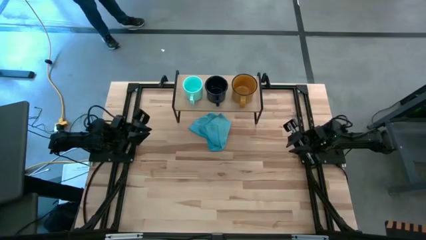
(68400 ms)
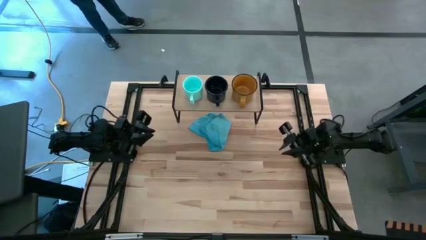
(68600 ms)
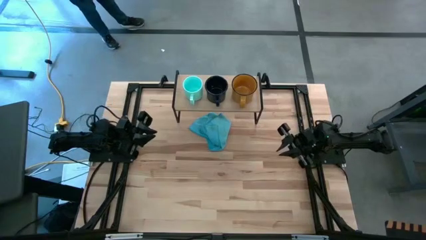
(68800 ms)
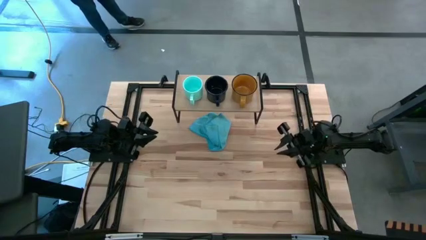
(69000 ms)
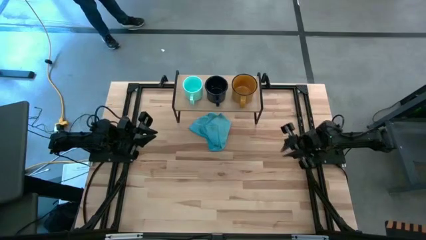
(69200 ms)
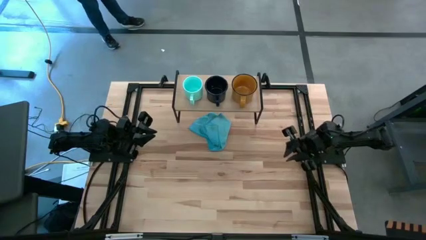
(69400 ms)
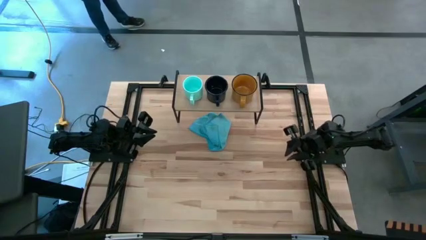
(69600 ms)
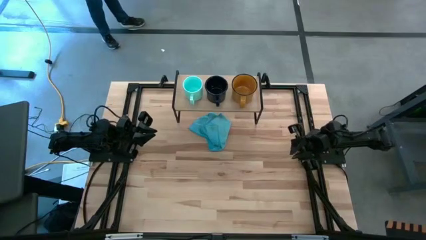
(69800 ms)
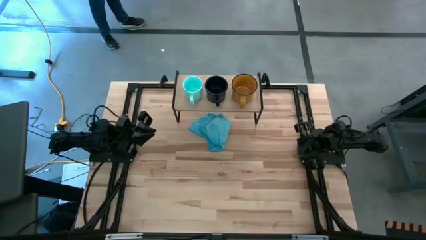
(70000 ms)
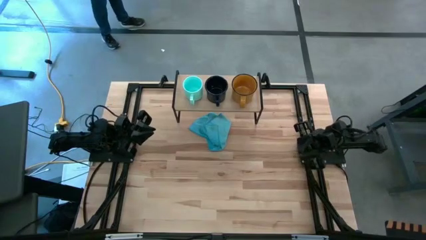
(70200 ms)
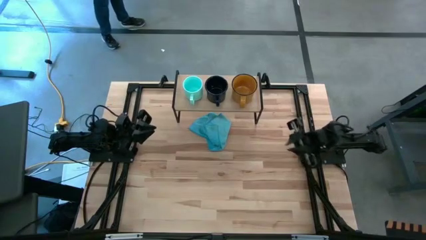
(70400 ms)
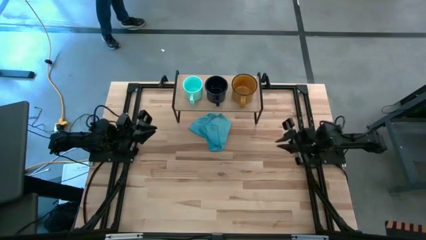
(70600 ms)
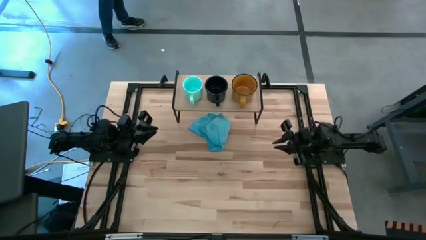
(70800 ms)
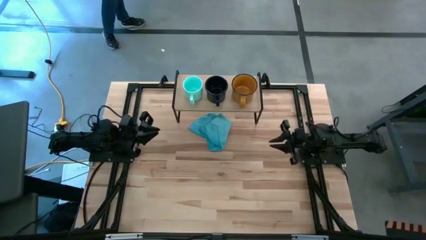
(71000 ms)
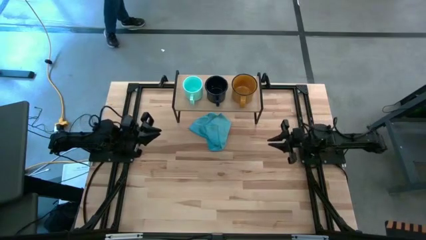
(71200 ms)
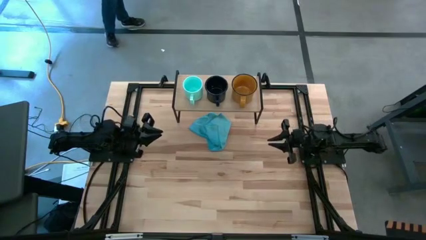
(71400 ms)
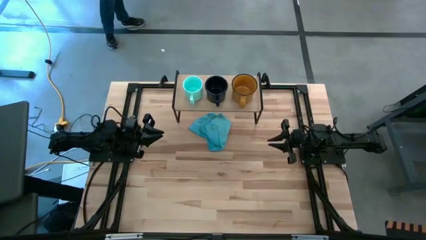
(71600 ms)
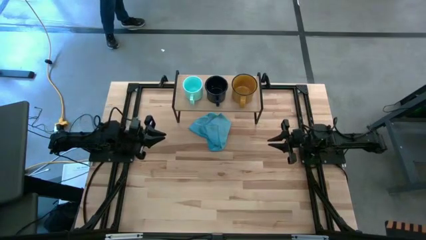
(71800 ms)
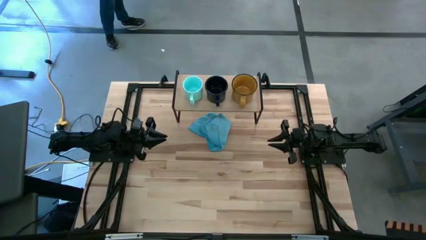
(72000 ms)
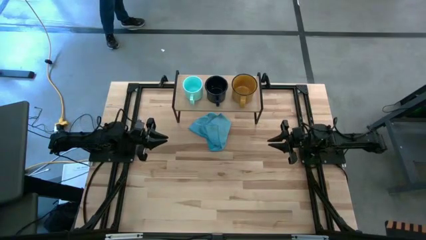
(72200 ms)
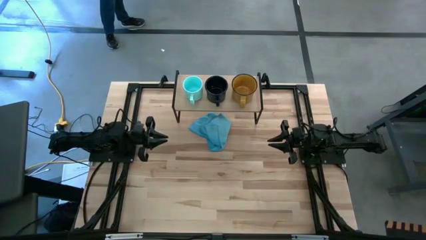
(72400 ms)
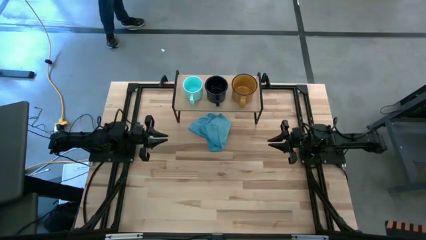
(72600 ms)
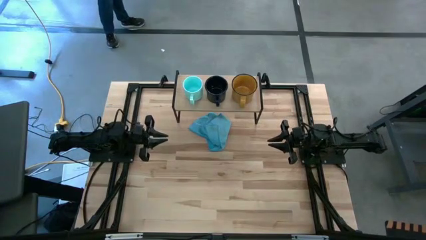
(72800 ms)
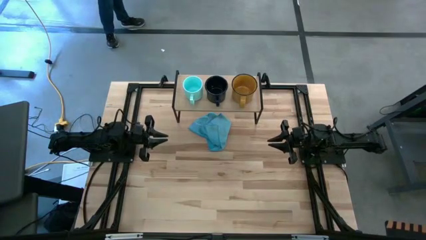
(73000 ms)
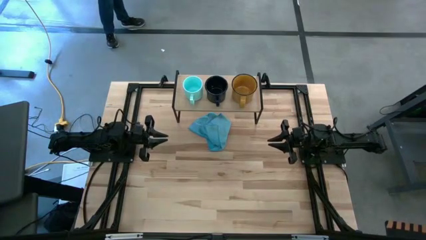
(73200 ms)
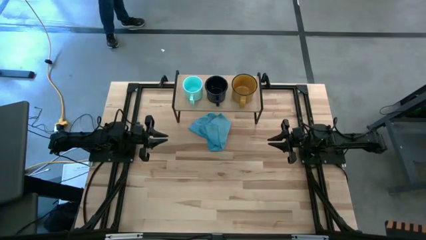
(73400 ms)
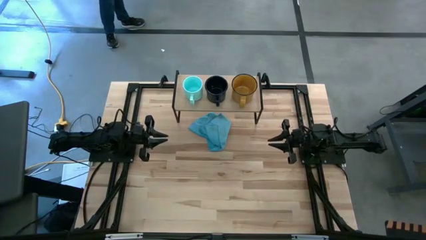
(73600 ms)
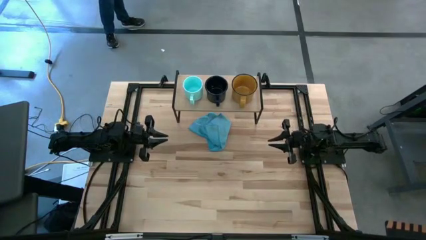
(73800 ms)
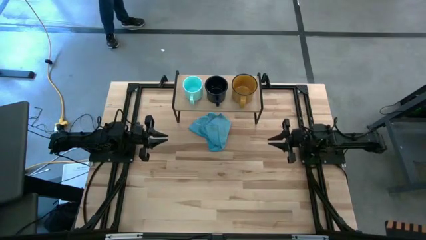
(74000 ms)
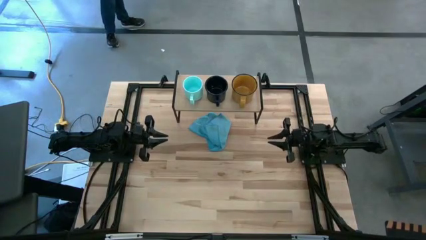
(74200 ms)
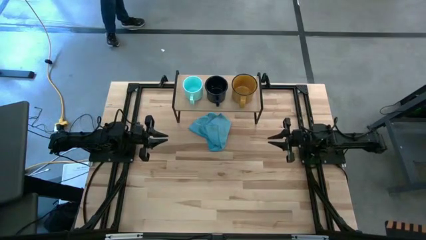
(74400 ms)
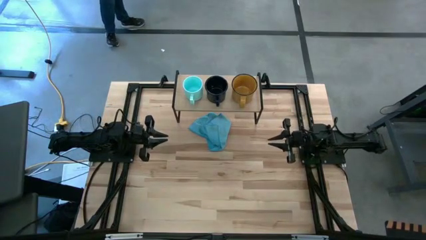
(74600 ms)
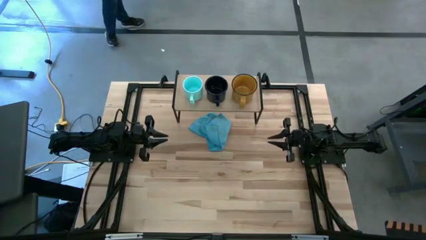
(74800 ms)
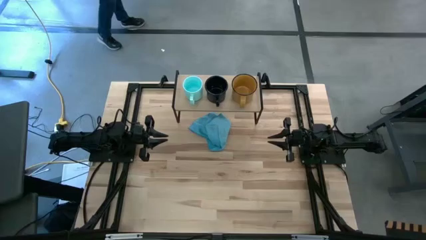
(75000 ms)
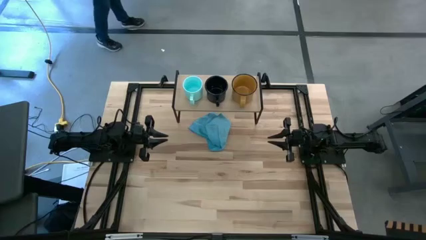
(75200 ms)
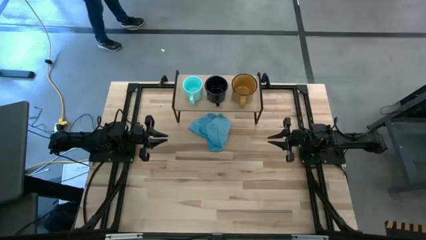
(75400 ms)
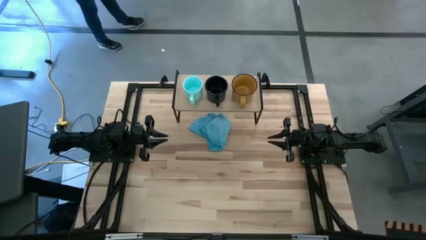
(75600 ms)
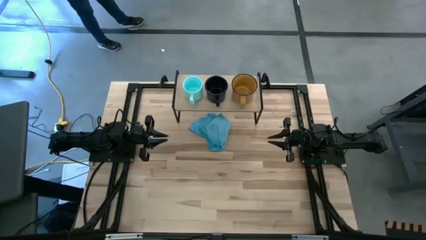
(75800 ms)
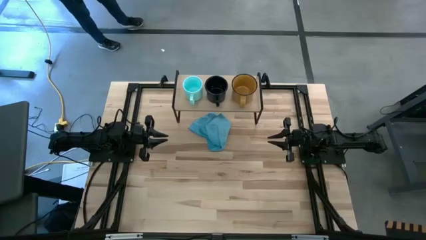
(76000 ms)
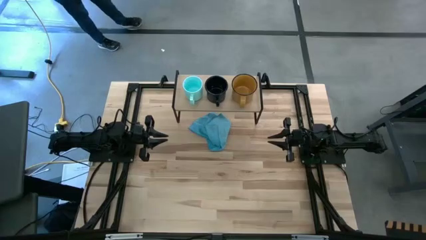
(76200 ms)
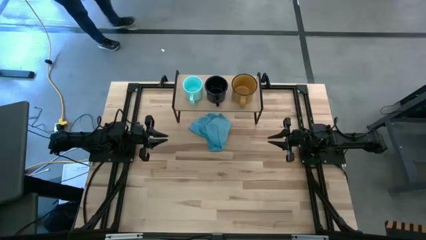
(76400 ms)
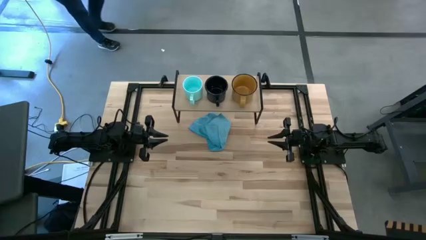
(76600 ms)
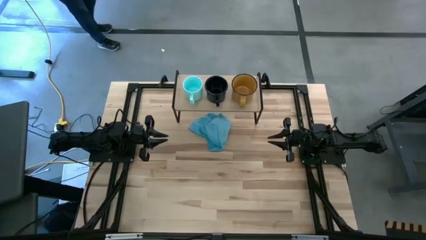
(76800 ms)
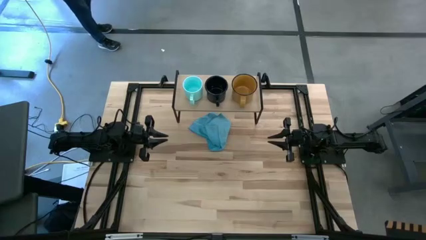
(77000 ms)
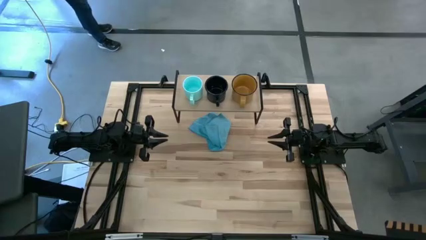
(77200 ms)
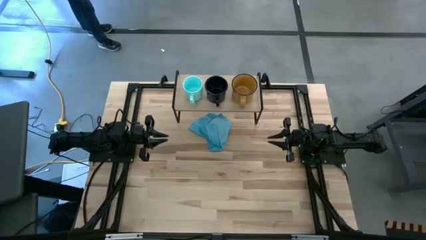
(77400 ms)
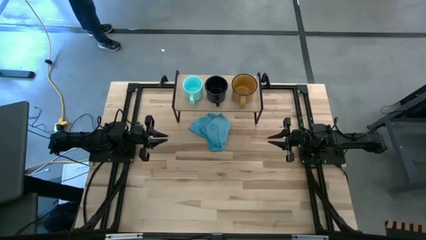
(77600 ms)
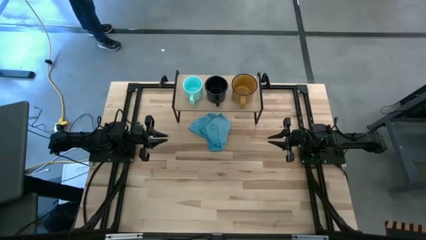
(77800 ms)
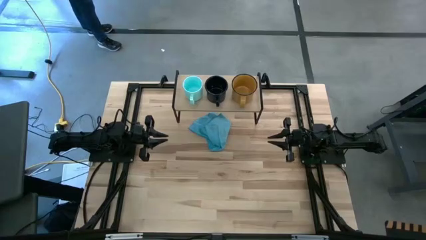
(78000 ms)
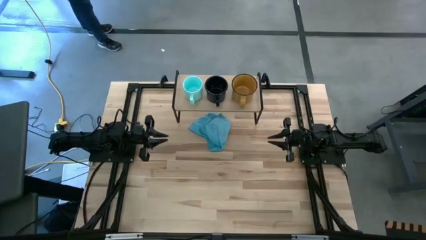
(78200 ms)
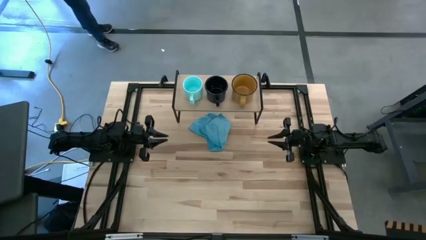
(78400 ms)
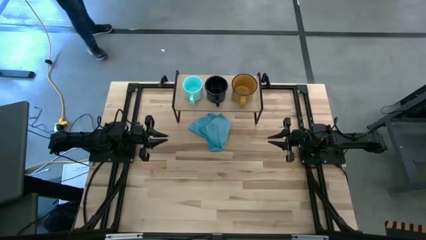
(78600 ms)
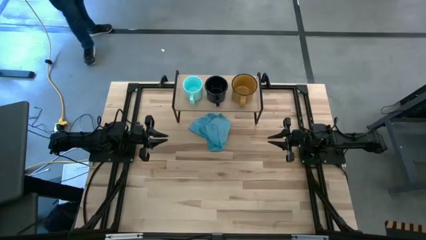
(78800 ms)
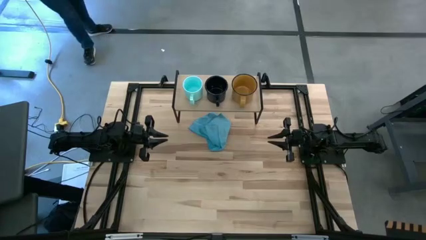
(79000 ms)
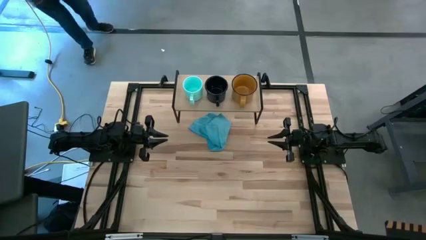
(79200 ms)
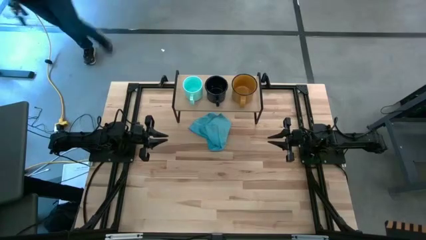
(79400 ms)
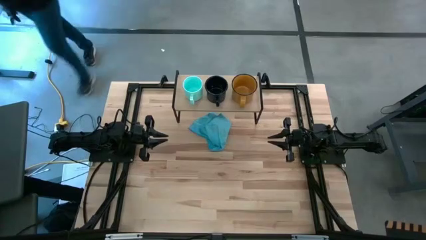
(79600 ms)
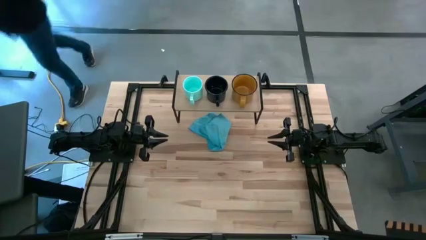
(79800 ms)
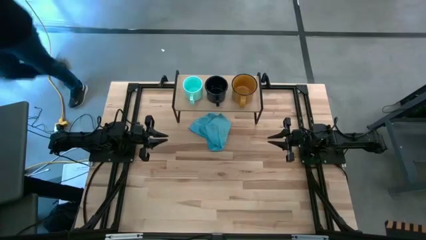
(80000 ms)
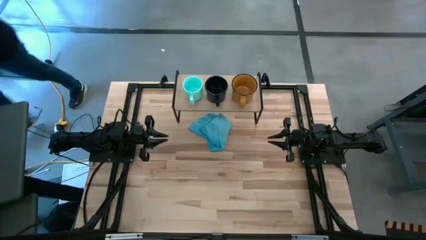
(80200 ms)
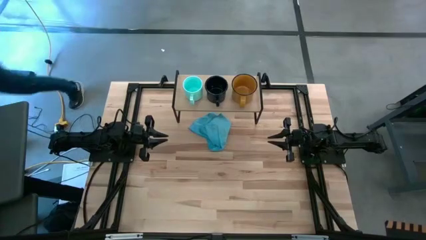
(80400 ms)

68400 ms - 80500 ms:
Task: Stack small to large cups/mugs on shelf
Return to Home Position

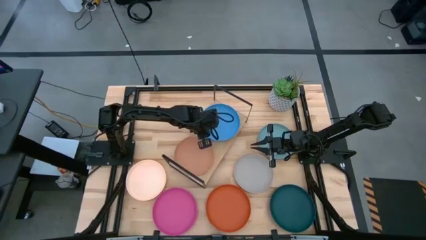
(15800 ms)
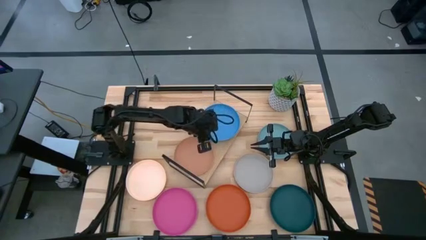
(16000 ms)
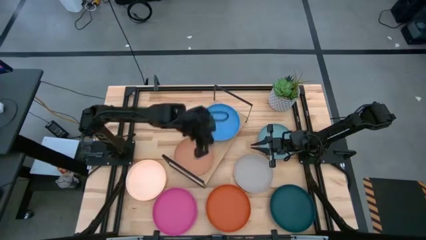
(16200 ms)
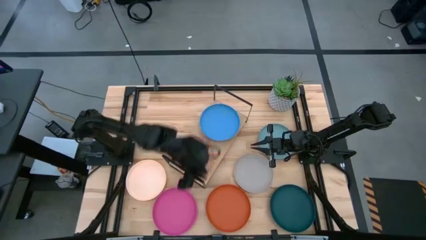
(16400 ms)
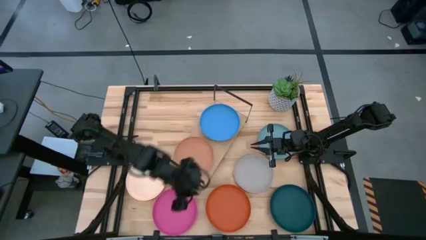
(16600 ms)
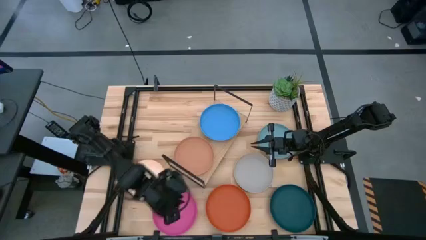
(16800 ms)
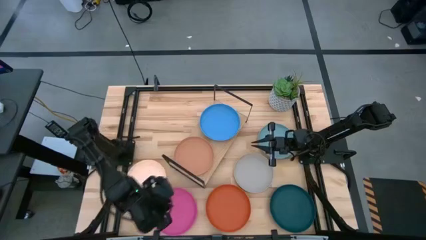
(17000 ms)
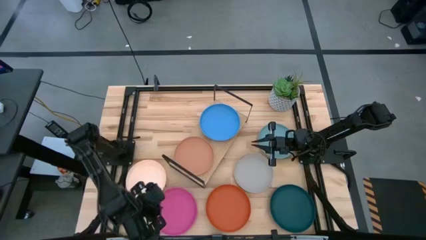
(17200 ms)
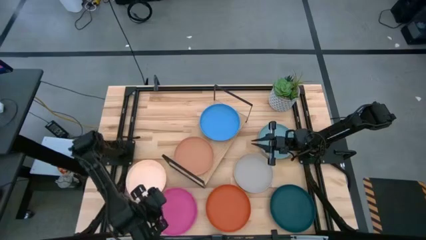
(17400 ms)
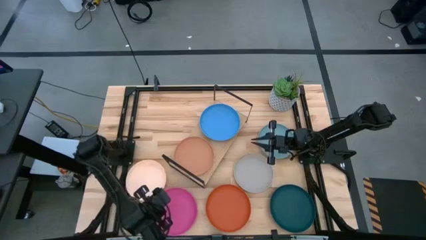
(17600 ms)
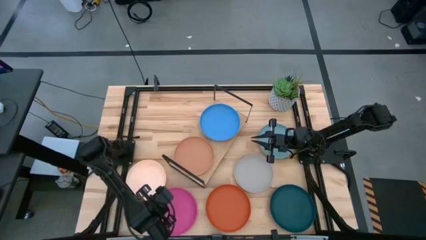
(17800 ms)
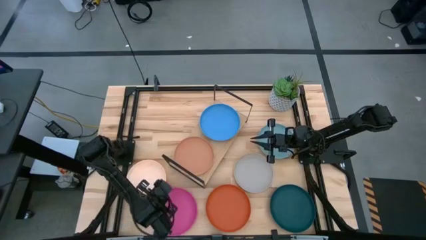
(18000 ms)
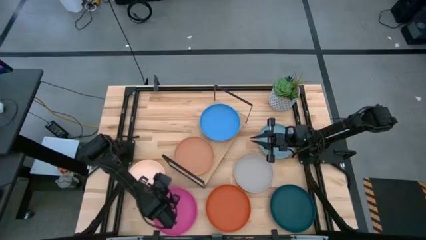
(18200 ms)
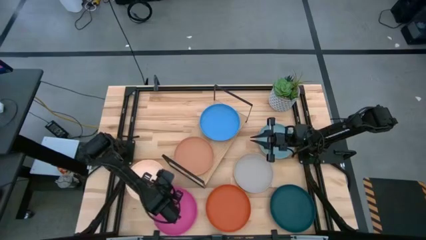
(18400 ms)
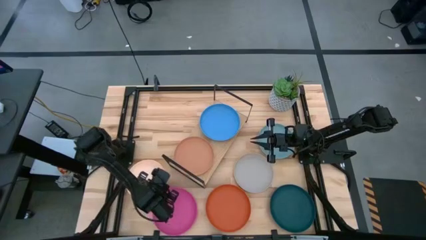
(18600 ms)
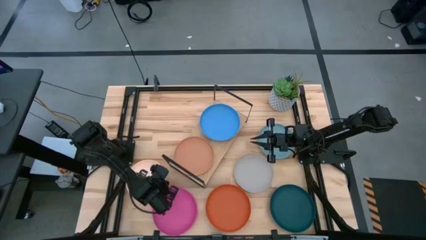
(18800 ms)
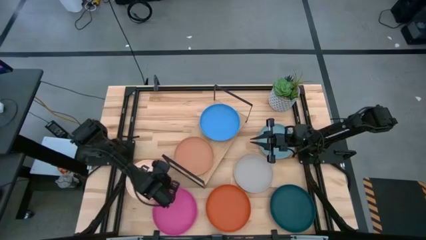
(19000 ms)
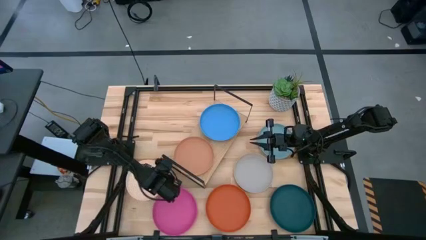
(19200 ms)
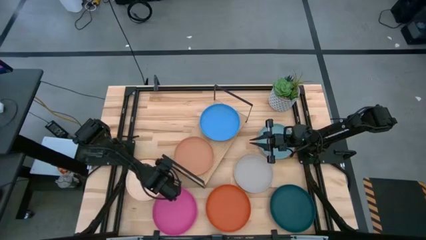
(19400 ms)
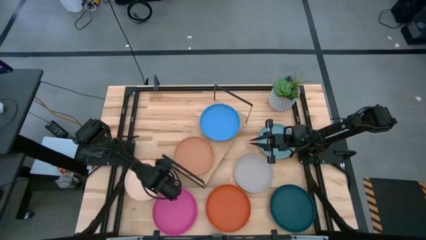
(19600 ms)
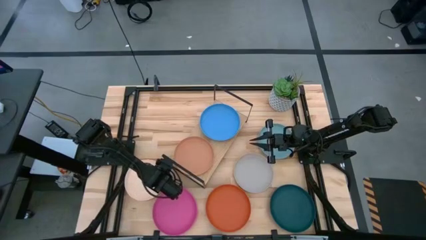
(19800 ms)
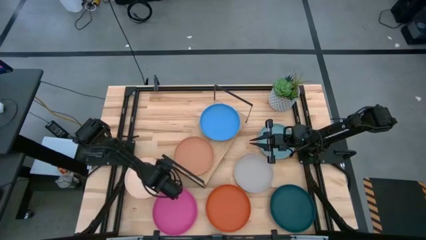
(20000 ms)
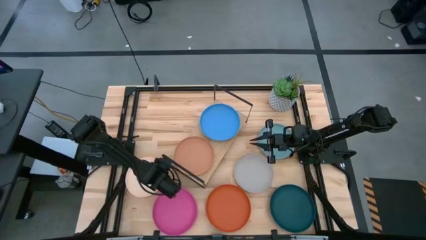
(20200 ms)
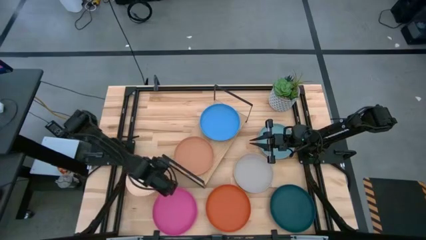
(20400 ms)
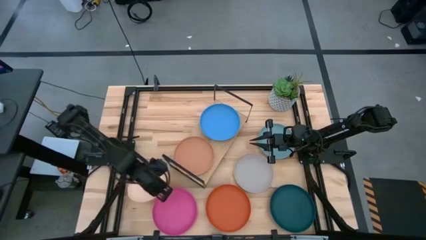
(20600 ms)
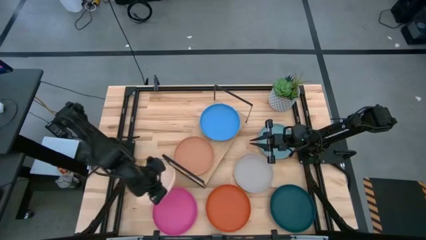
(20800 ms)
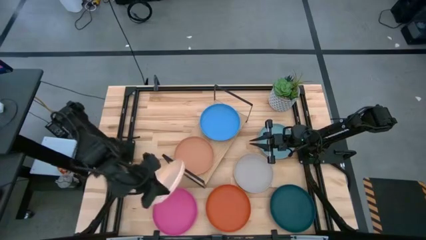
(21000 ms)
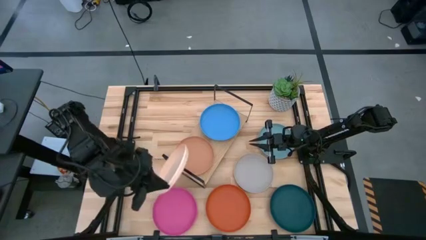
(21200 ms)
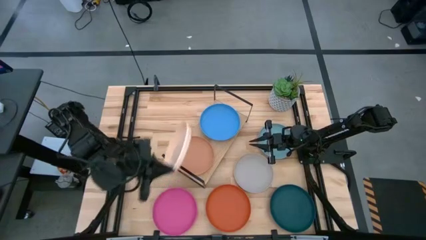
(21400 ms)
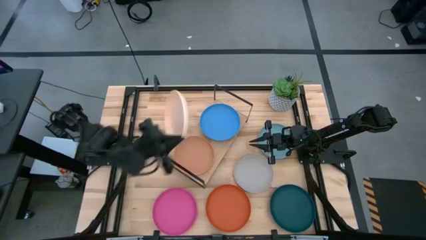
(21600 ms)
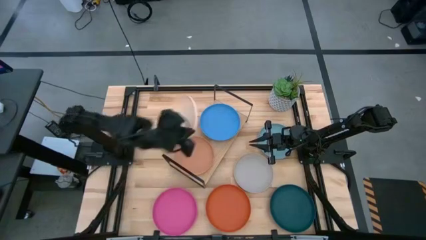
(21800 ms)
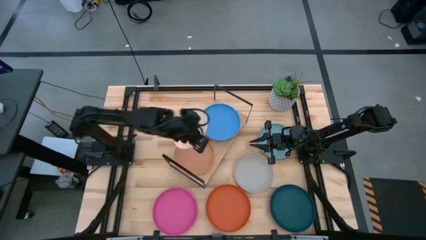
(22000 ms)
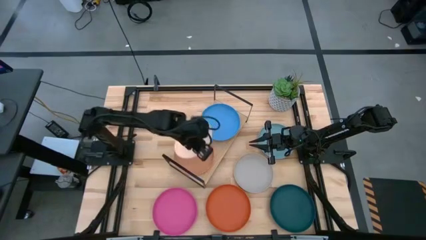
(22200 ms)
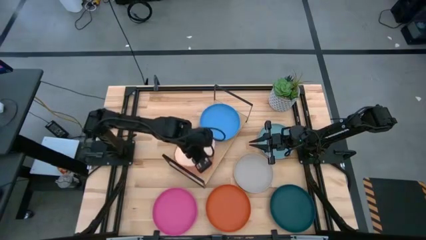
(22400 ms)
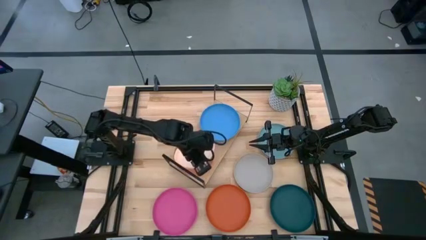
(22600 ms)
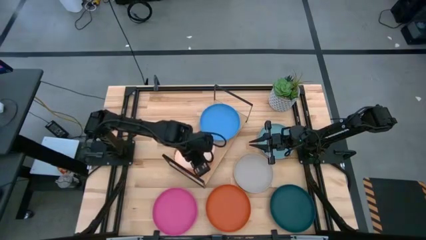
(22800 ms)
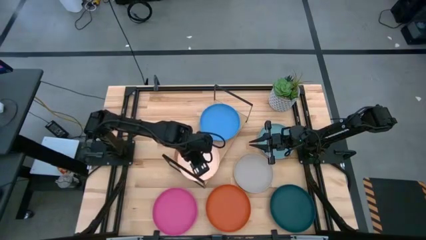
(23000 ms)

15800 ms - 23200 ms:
Task: Place and stack plates onto a shelf
Stack the white plate on top of the brown plate on the shelf
